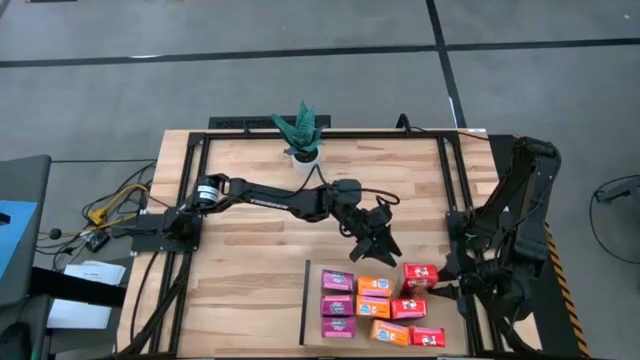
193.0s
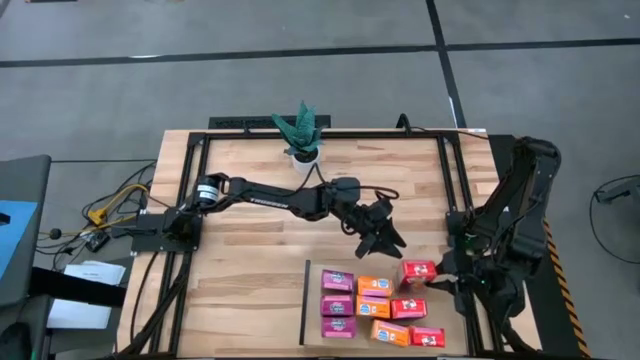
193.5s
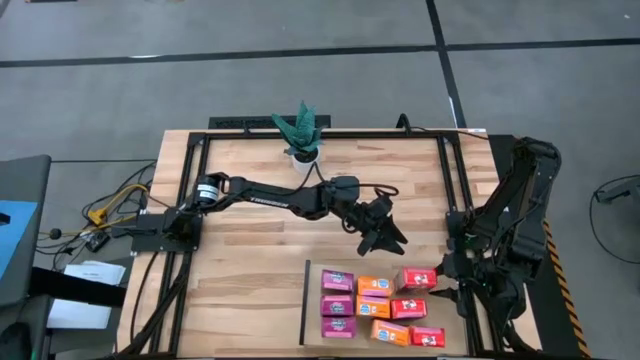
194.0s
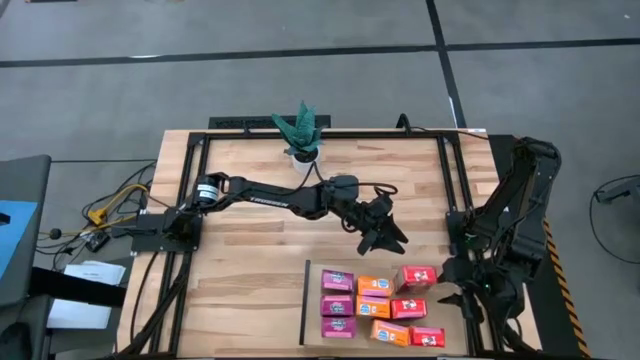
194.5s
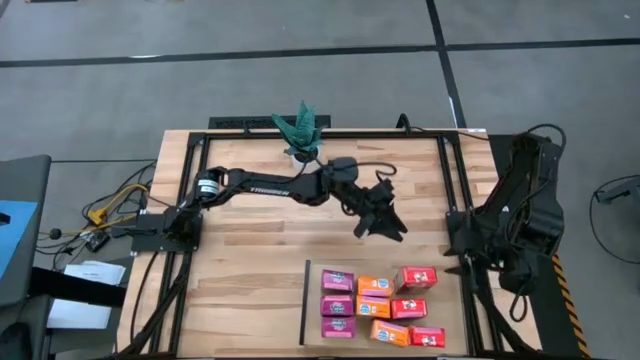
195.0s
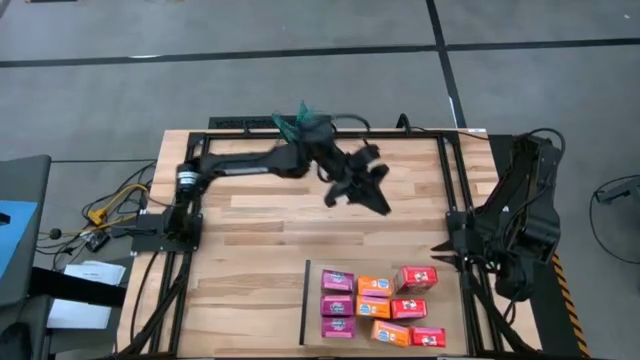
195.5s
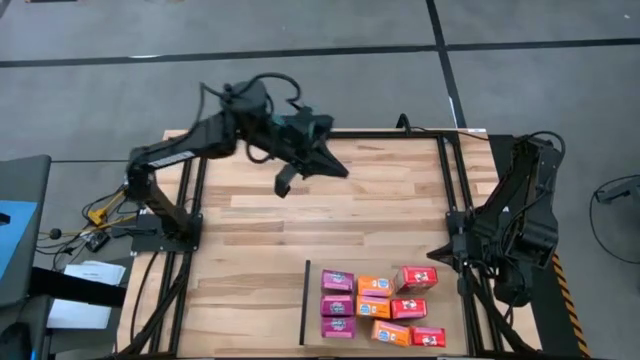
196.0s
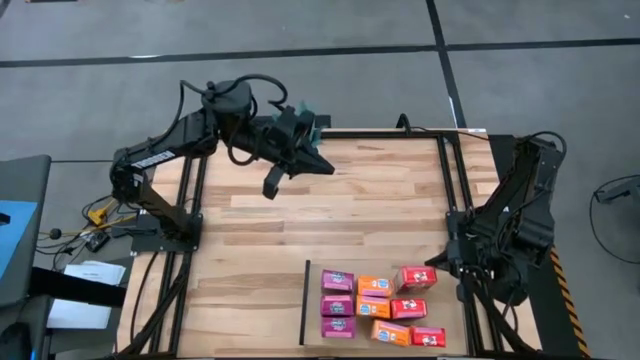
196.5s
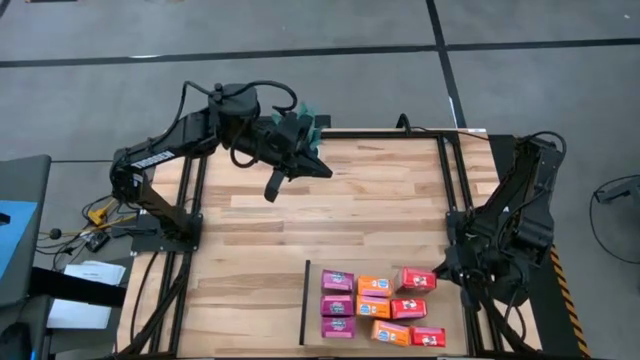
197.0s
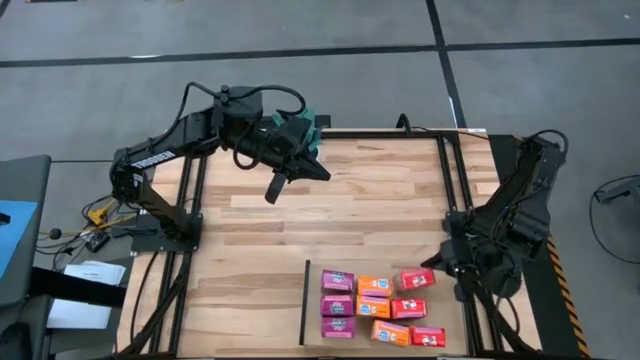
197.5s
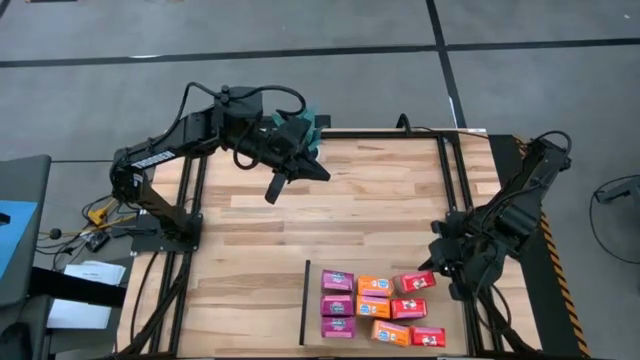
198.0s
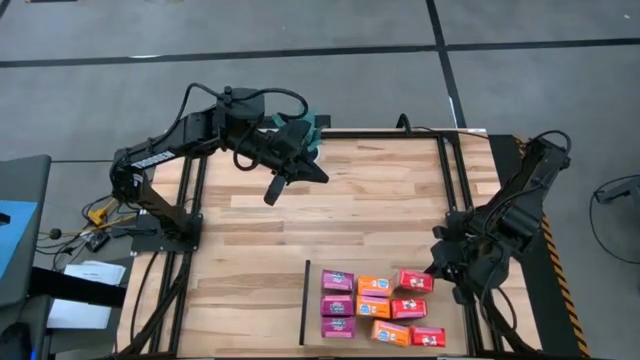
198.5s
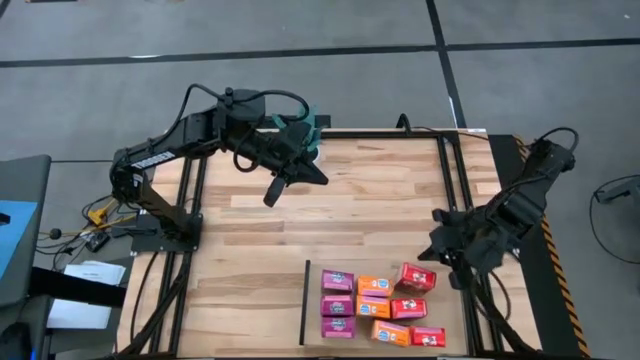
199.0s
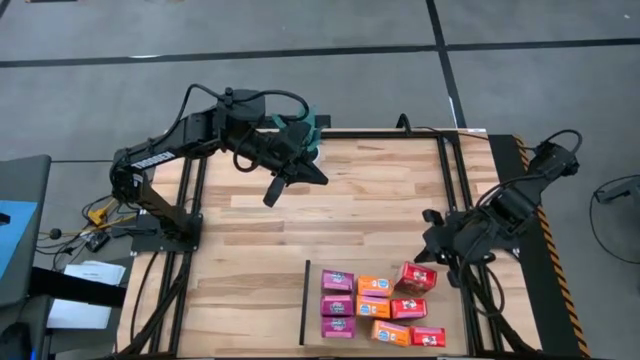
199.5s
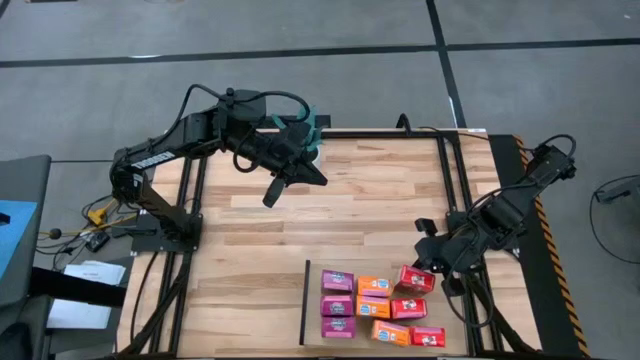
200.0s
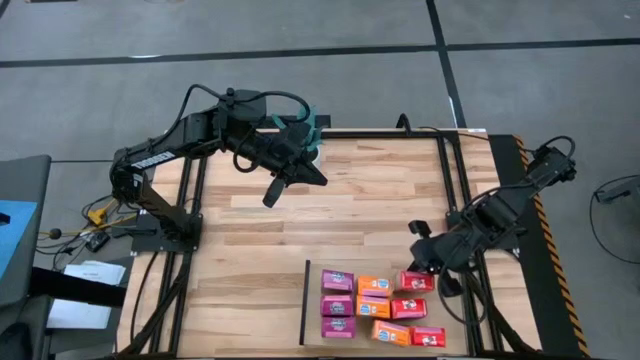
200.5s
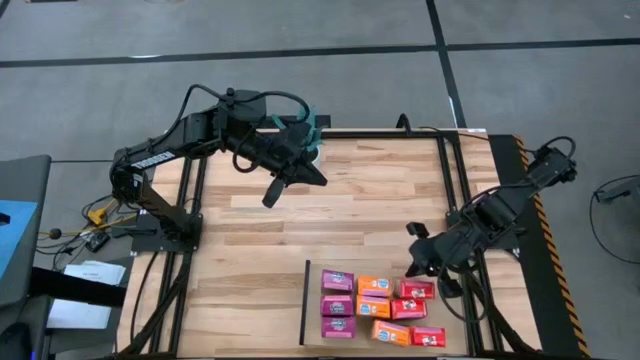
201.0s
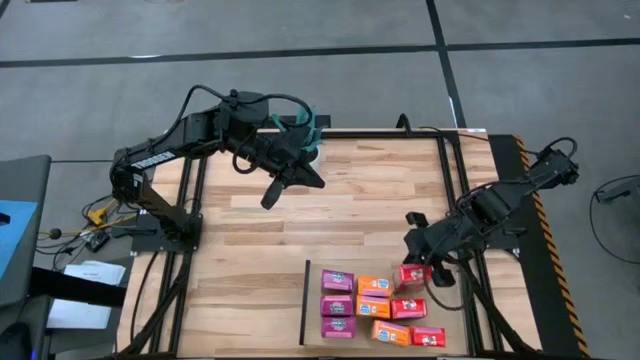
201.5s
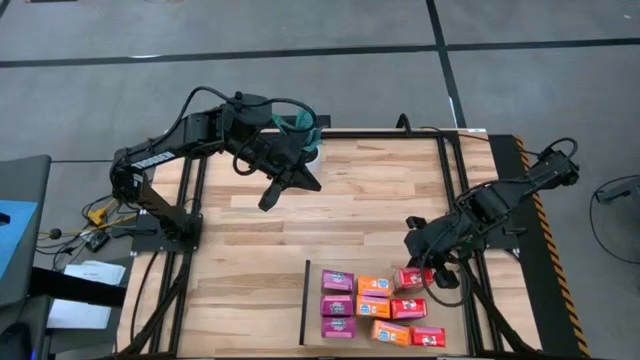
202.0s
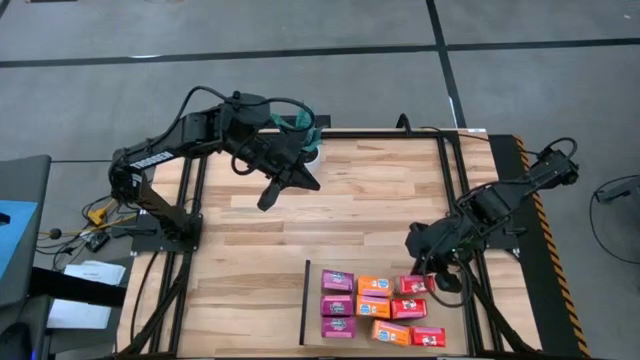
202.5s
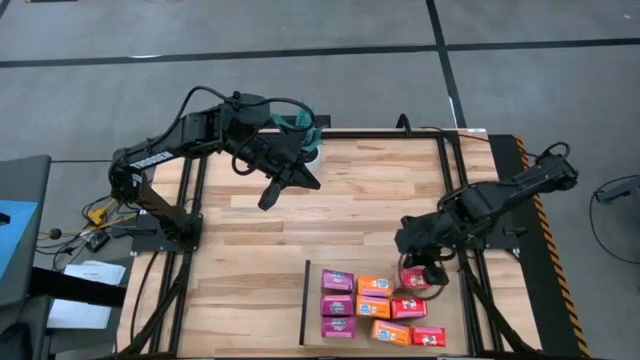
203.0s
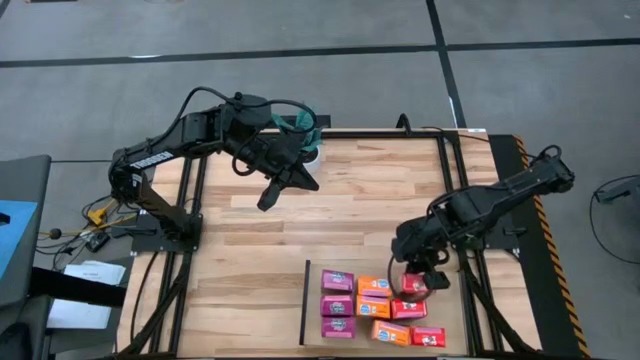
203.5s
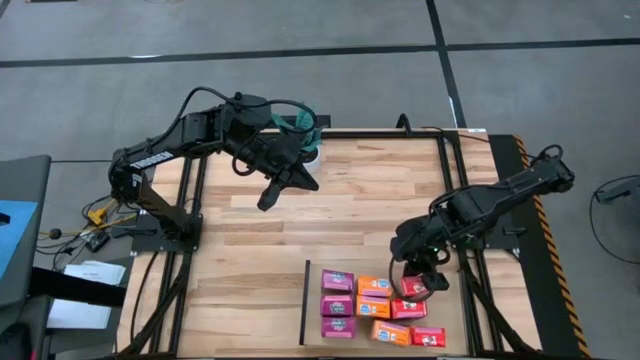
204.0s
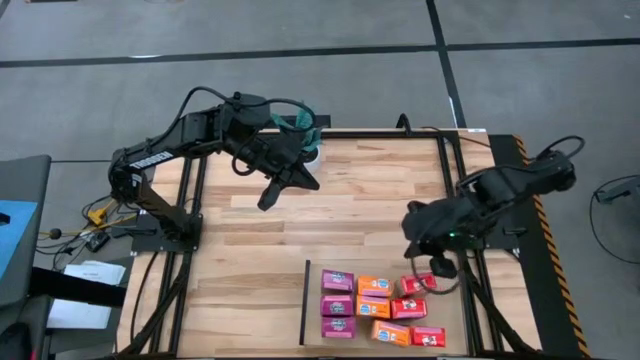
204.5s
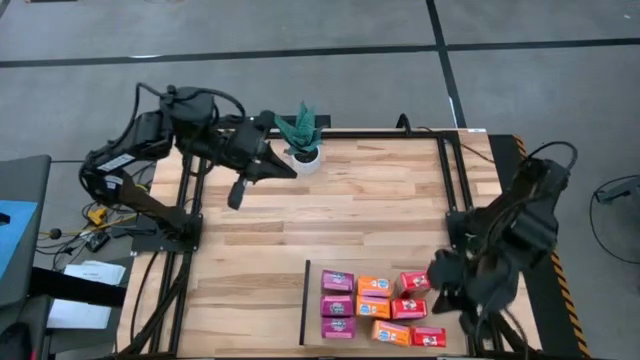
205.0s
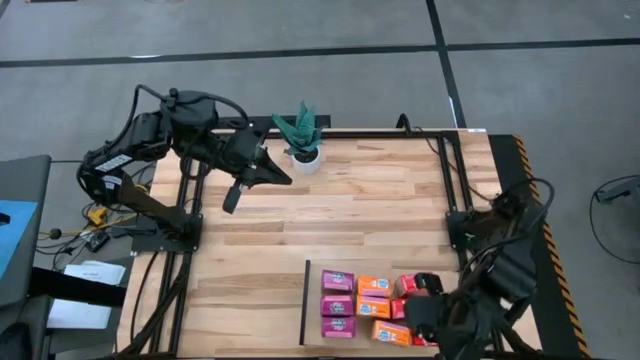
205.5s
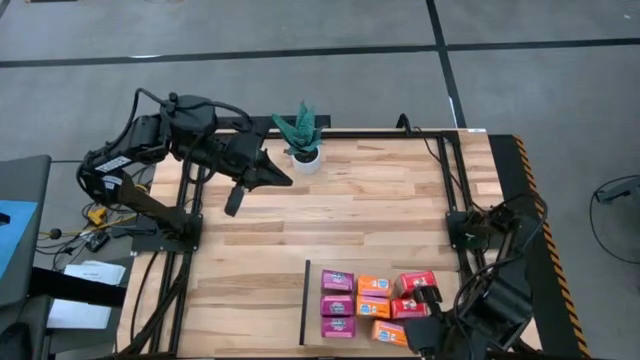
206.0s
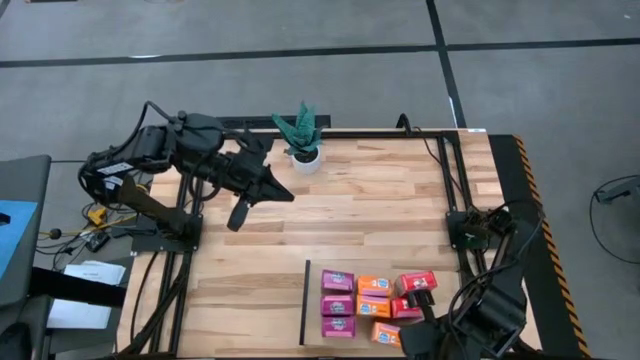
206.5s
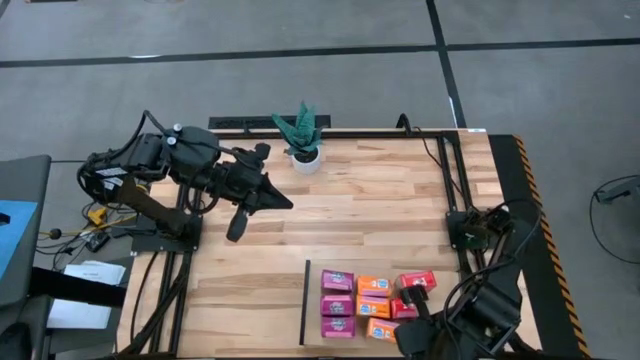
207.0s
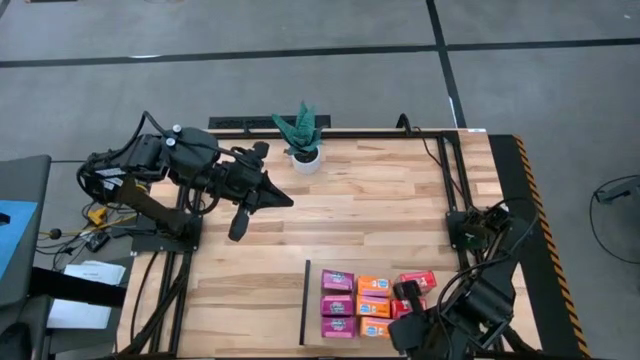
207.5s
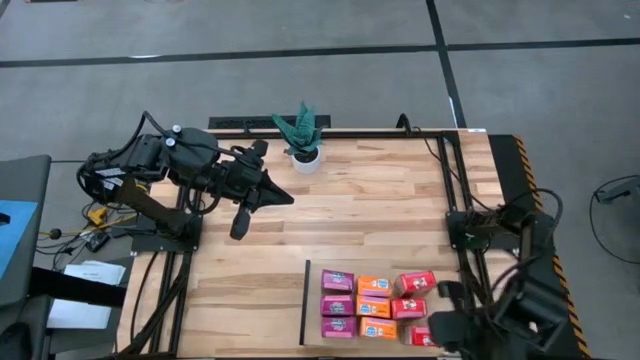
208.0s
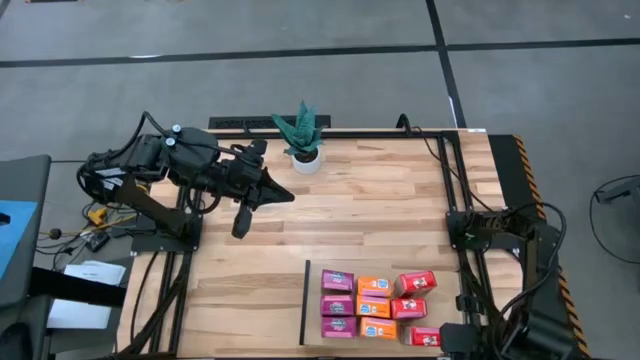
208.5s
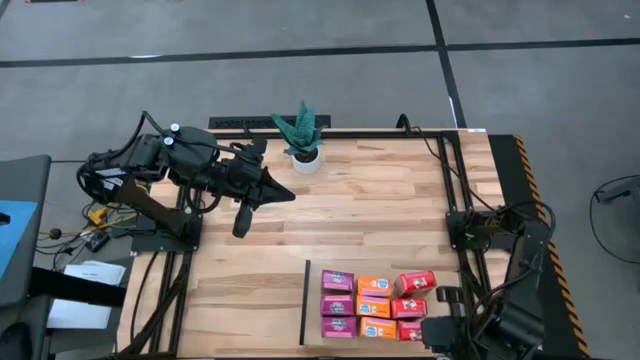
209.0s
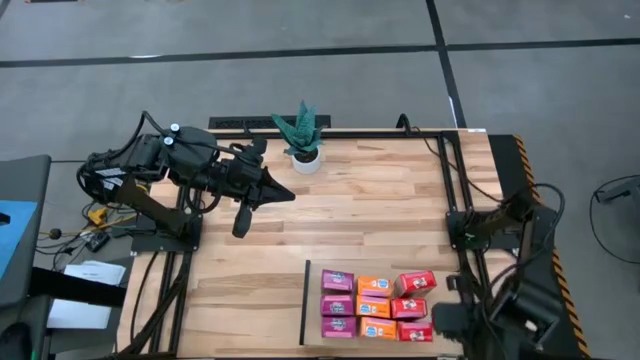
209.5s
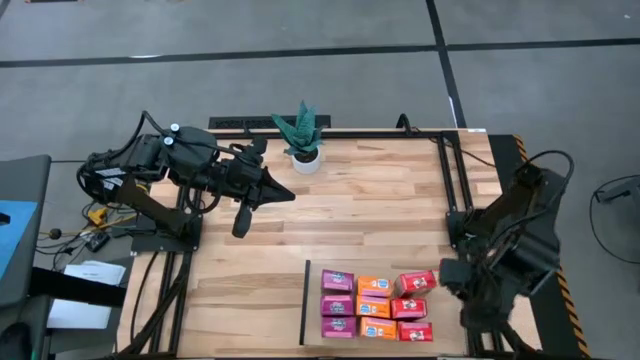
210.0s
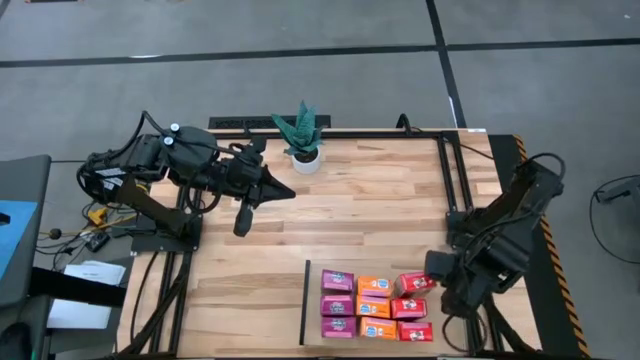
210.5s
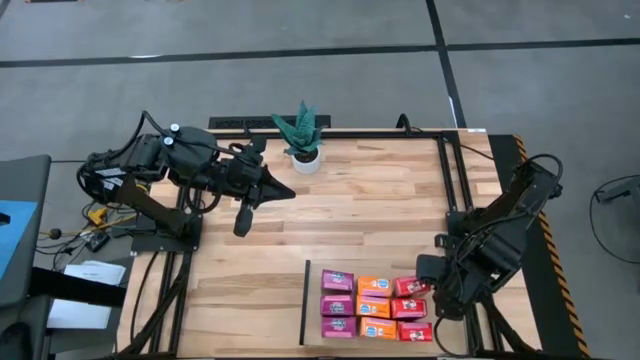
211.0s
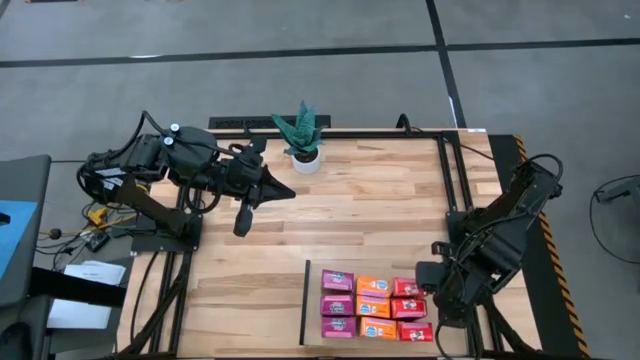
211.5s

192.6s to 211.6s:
Task: Stack cereal on shelf
Put the red cereal box on the upper right shelf
